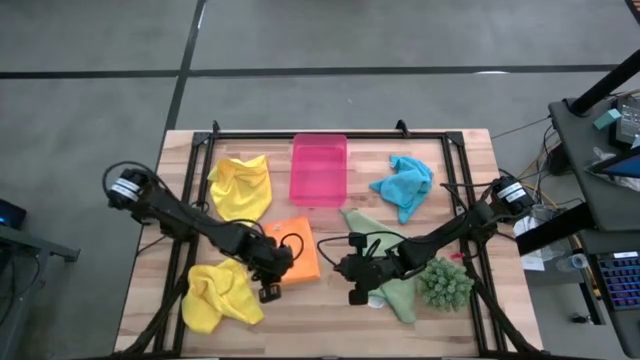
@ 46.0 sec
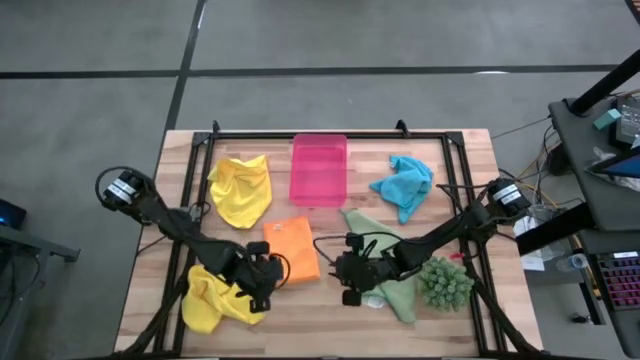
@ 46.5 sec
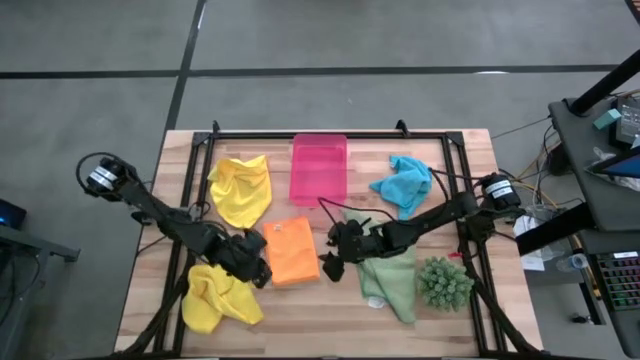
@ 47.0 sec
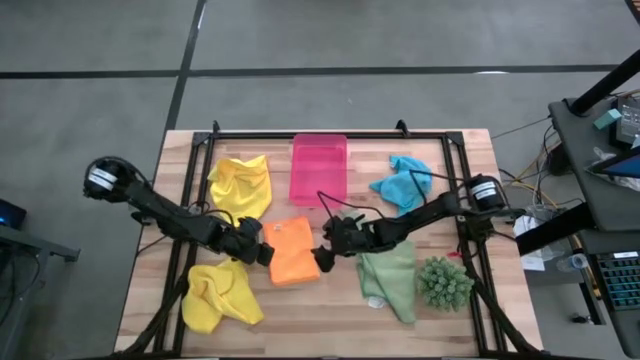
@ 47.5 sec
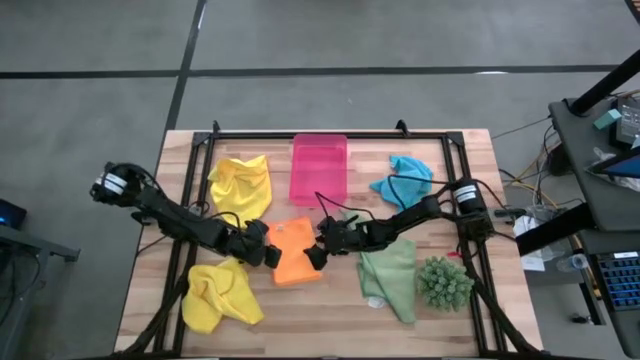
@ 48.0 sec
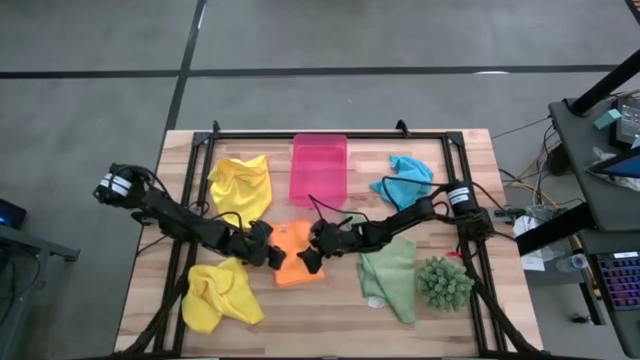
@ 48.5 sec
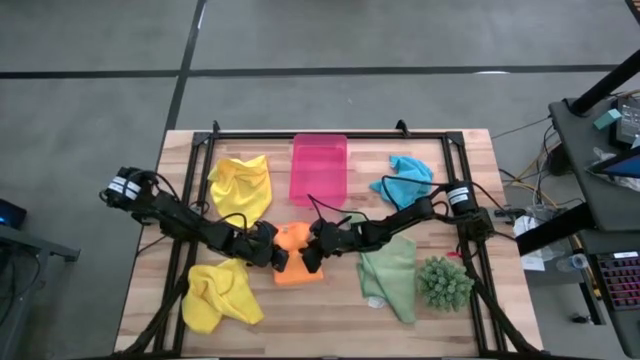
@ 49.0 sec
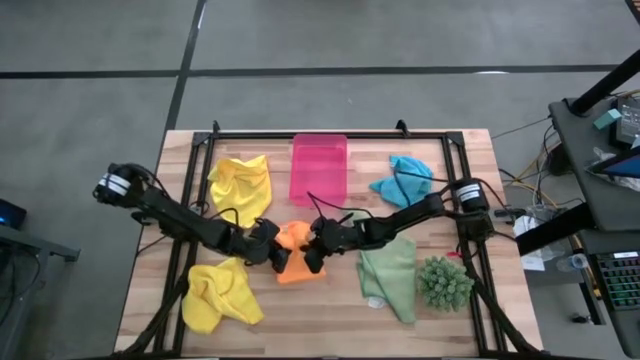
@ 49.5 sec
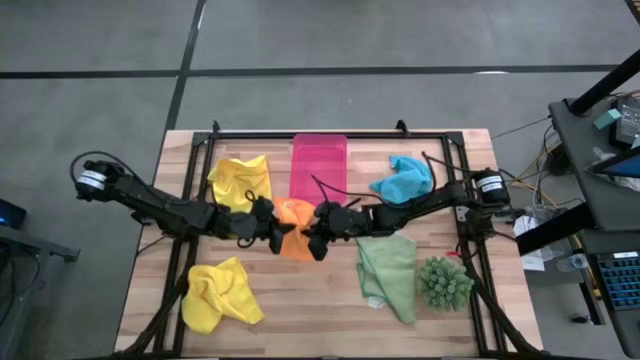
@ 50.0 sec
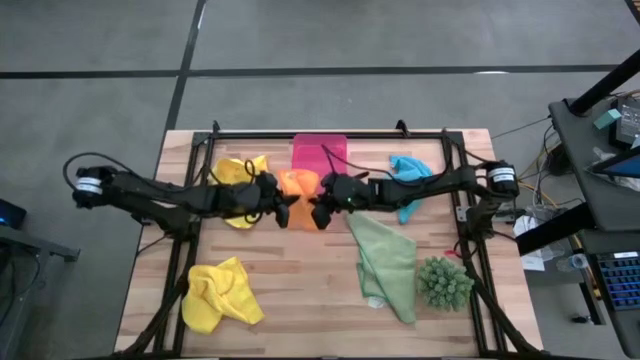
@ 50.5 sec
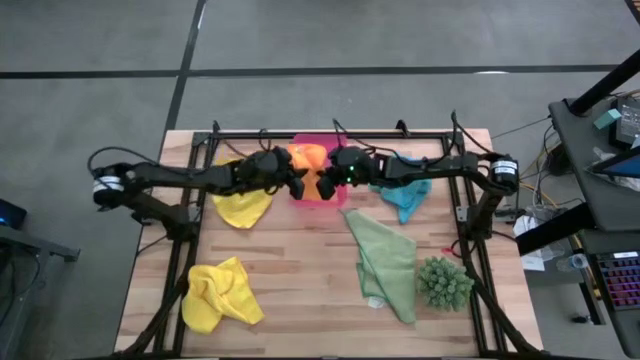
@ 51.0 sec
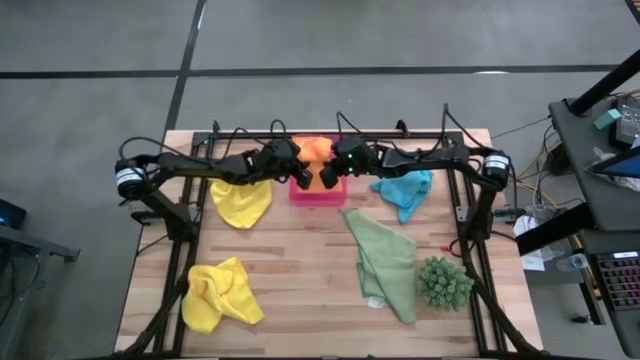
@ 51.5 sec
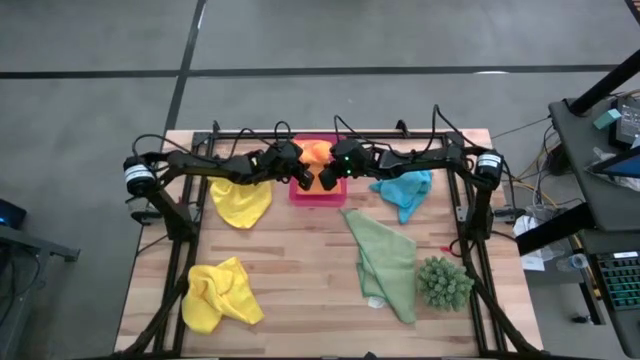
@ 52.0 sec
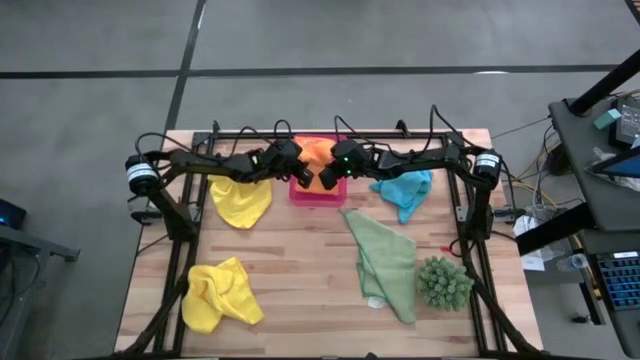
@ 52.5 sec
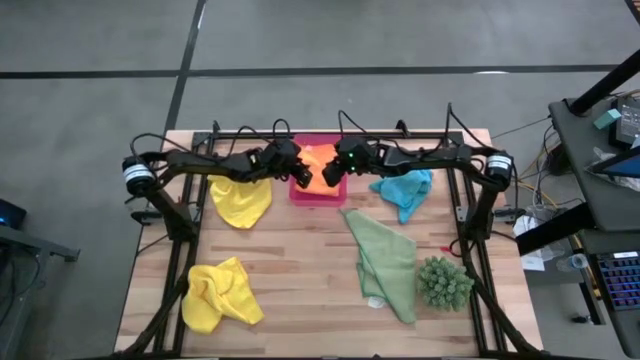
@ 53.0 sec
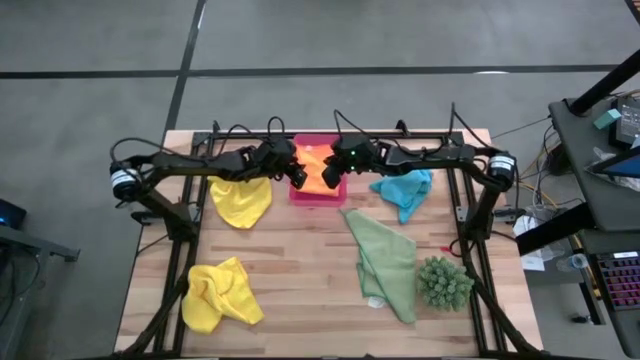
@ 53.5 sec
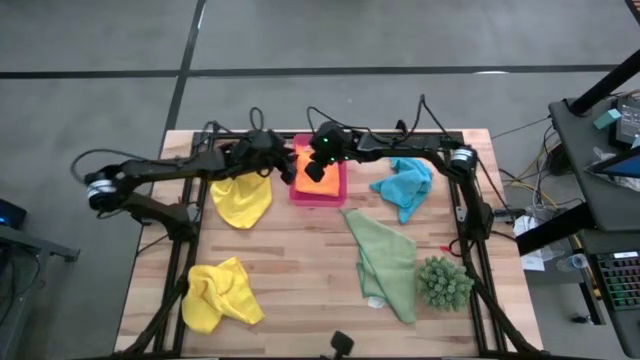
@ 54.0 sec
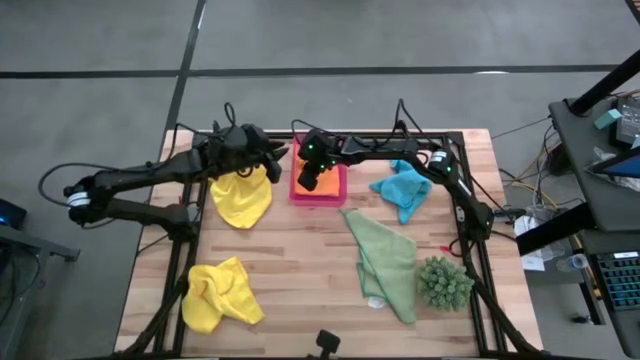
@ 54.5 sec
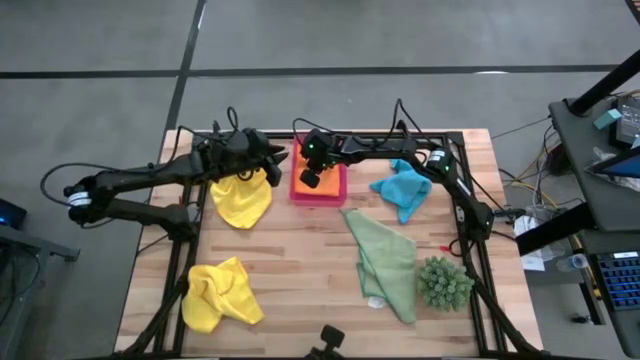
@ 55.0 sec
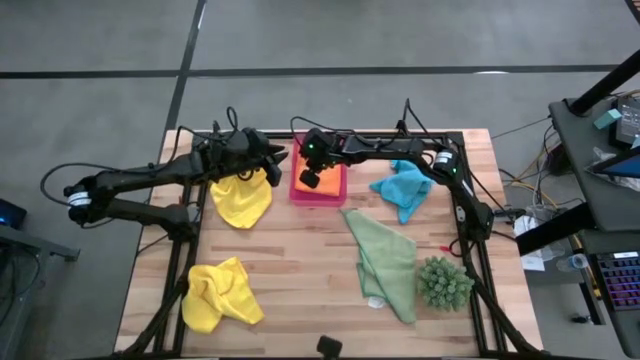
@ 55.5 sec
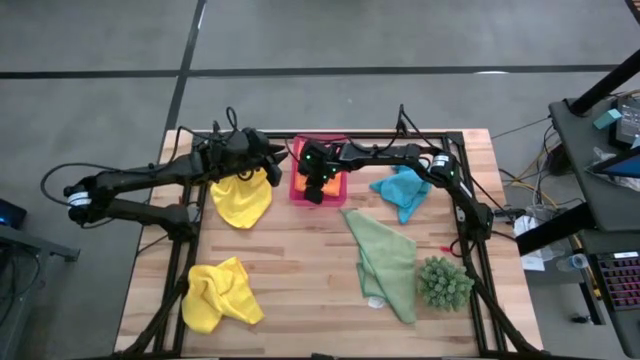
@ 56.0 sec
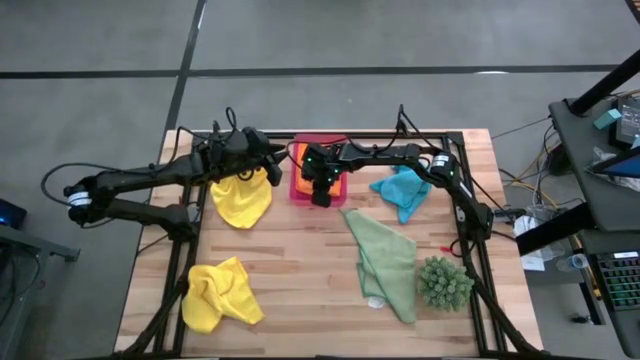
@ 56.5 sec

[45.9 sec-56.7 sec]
Task: Fold microfiber towels
Put the orange towel into the bin
